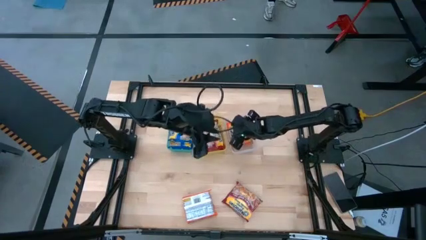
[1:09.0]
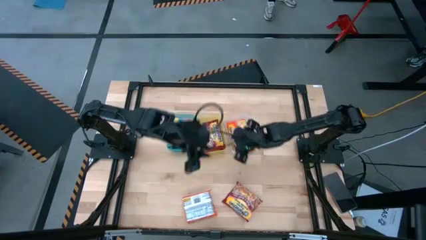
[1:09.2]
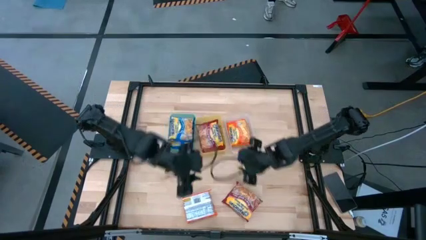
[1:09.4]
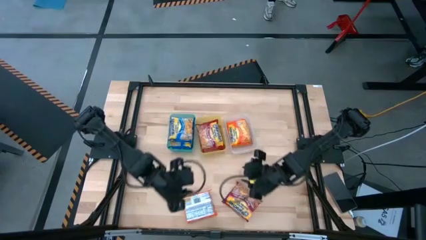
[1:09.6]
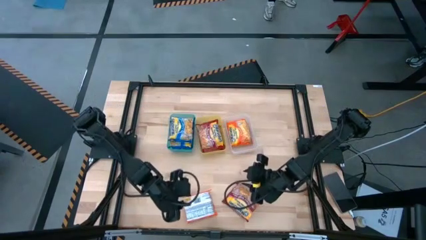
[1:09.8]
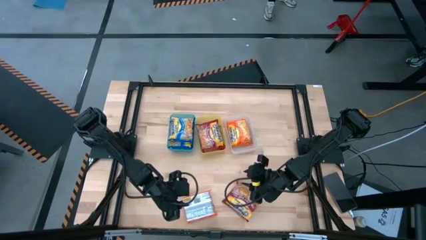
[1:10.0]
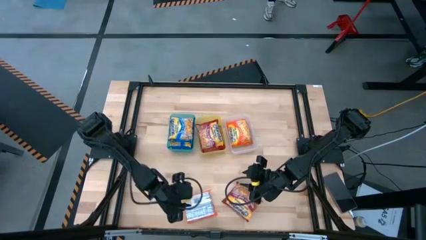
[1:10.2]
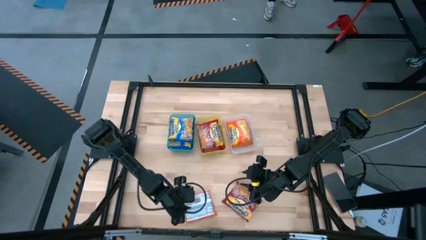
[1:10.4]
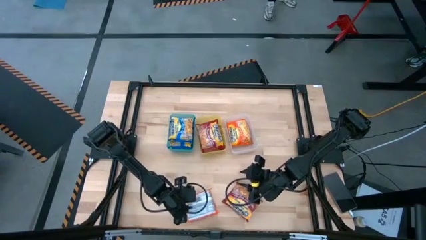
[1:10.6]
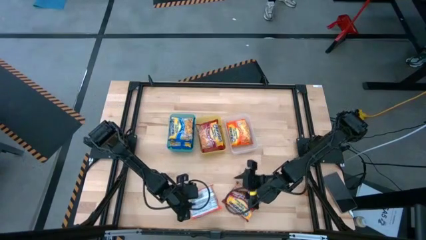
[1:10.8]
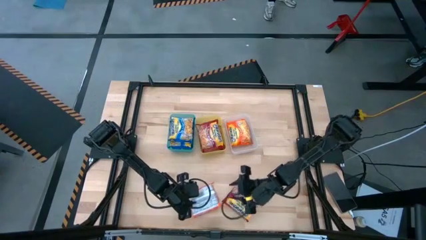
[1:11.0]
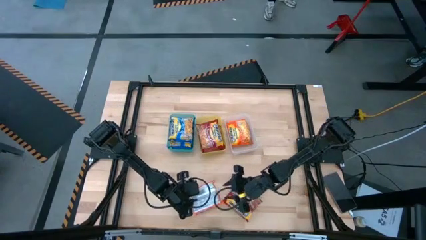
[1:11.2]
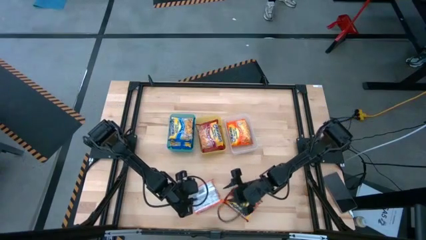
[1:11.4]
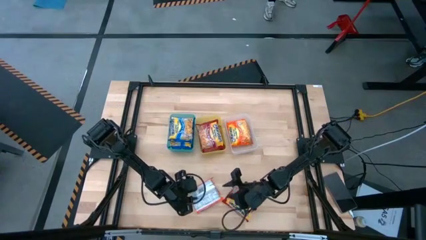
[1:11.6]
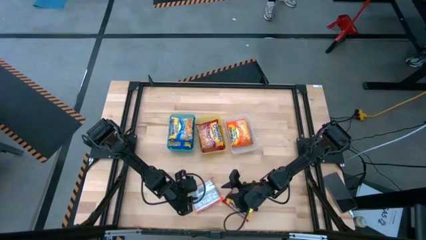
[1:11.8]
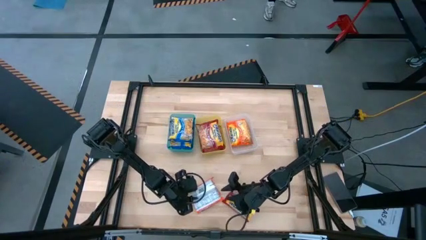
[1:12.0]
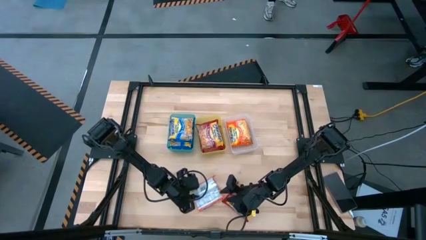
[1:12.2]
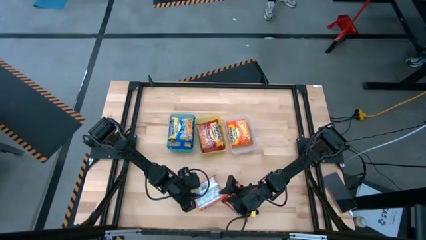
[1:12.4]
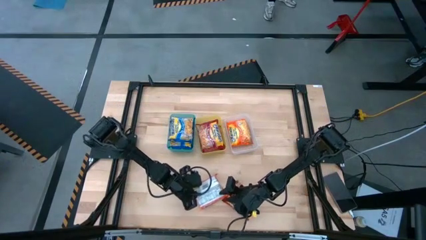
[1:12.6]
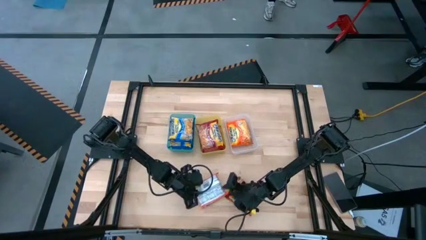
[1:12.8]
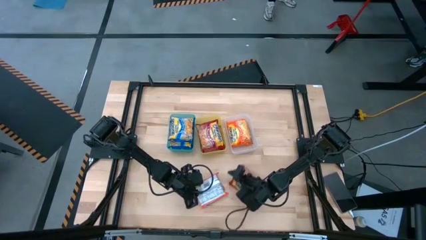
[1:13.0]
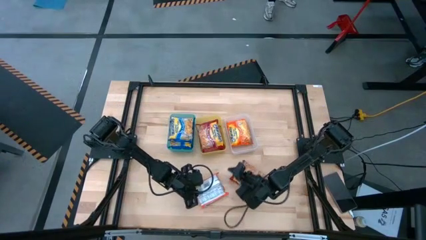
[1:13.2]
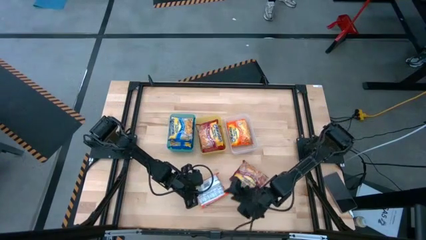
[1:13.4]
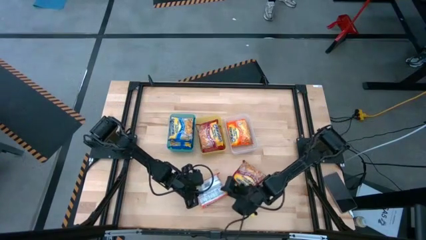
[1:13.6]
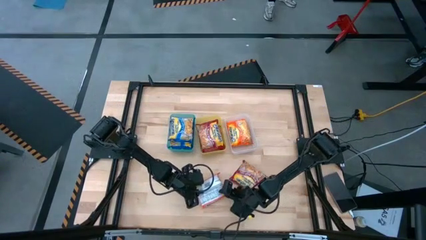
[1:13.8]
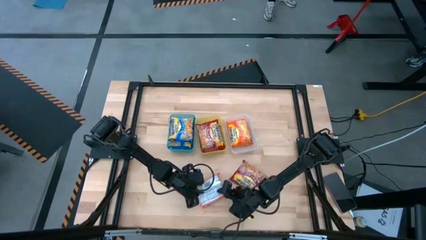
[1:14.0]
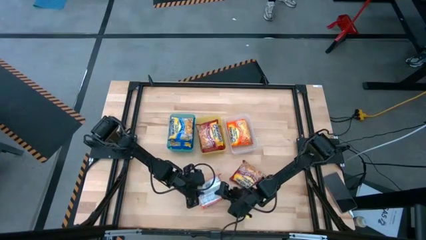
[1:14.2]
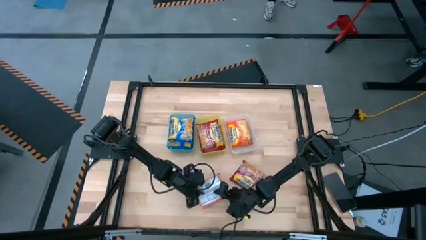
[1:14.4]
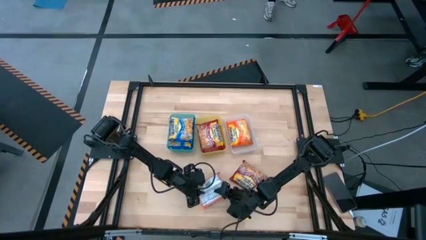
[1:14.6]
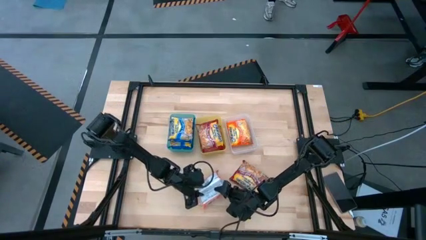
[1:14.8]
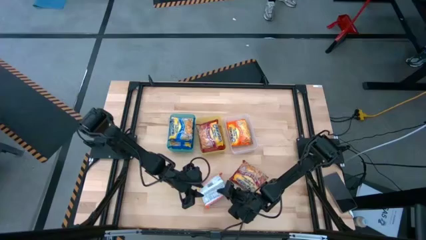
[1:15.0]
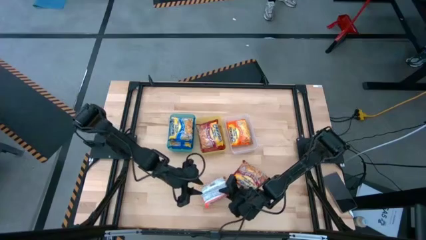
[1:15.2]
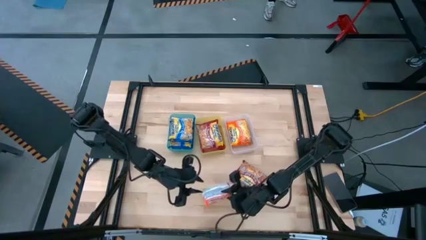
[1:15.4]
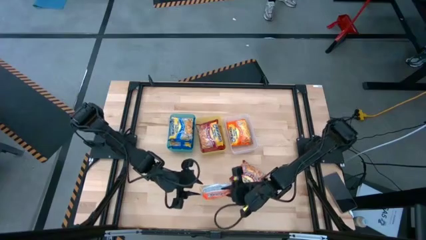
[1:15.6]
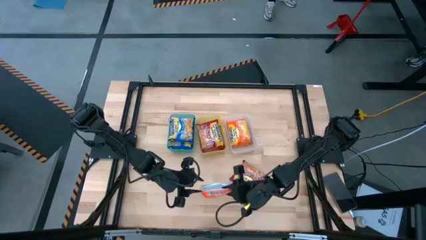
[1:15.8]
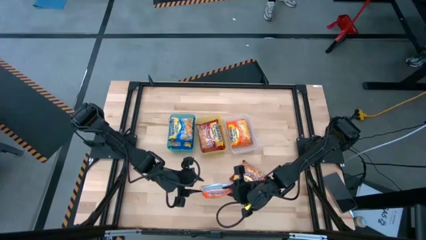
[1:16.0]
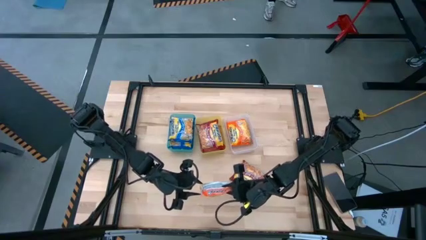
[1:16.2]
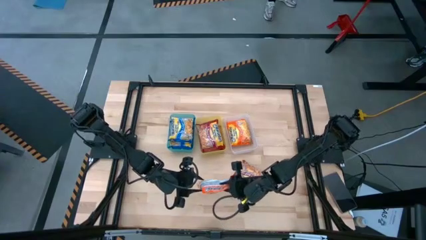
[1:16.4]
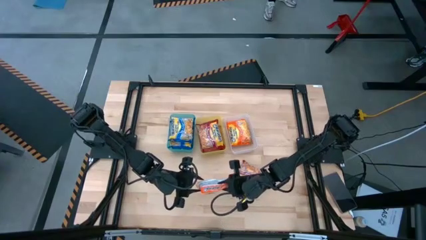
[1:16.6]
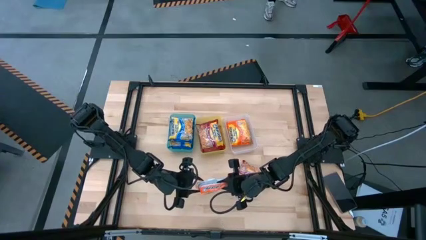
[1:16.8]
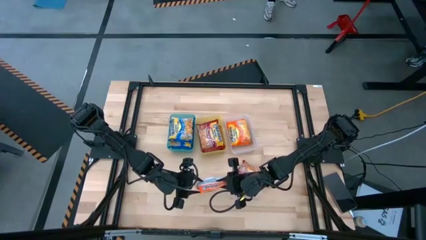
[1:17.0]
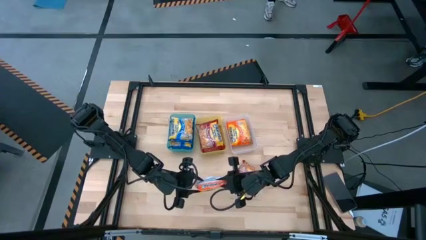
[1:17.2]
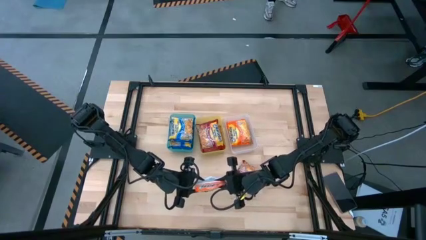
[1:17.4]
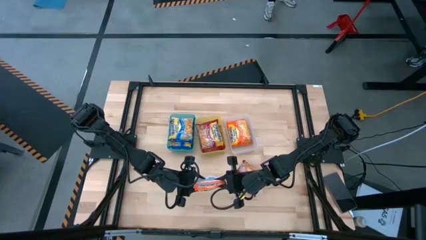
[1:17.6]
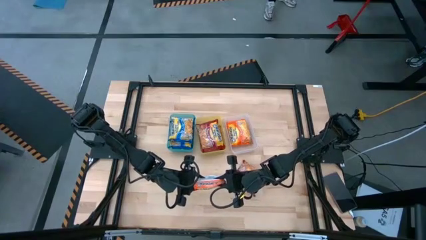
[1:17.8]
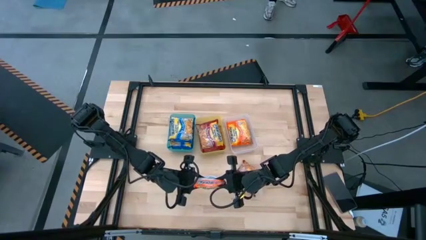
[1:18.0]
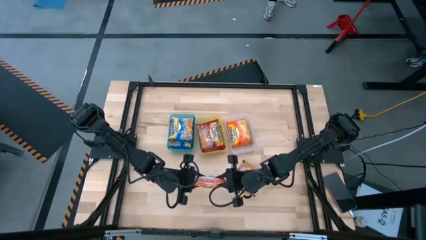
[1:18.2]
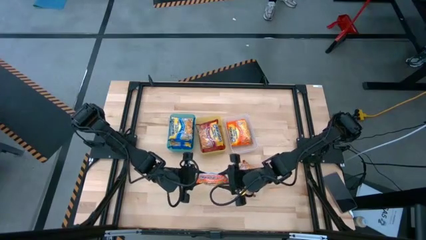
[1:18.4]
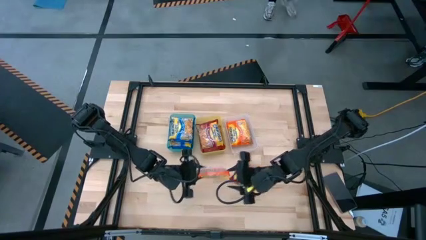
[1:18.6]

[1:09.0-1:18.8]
Task: Sort Maruchan noodles
Put the orange bag into the white bin

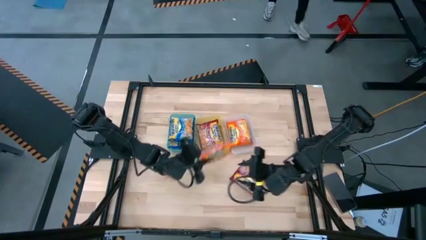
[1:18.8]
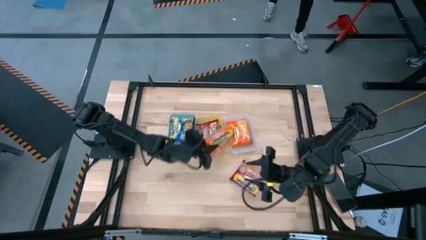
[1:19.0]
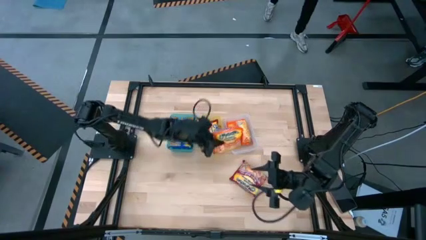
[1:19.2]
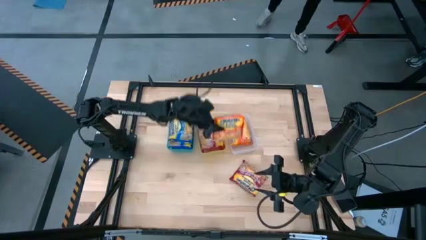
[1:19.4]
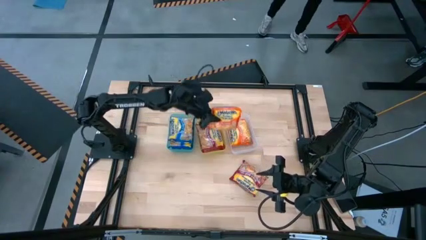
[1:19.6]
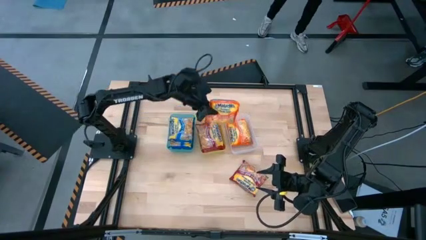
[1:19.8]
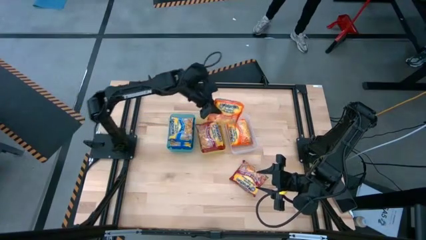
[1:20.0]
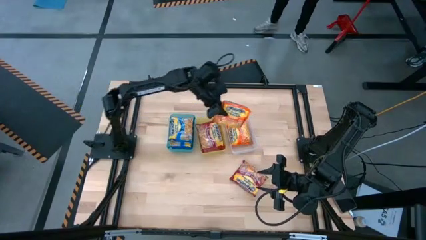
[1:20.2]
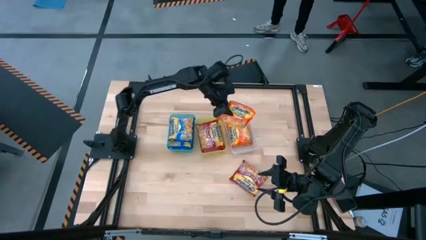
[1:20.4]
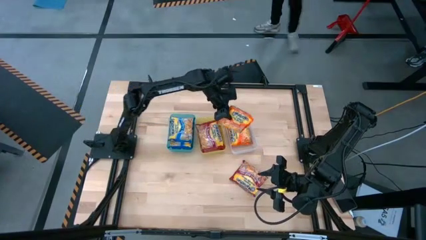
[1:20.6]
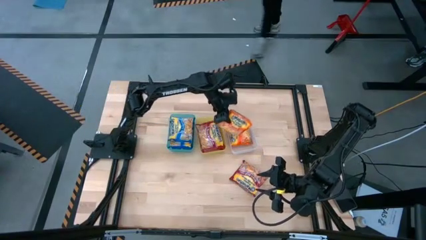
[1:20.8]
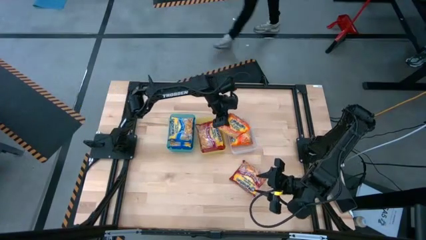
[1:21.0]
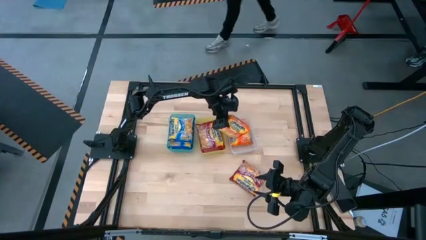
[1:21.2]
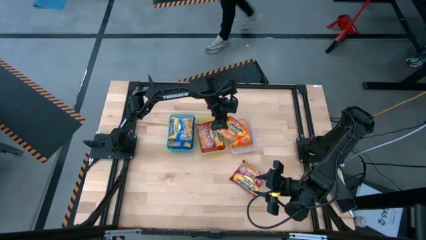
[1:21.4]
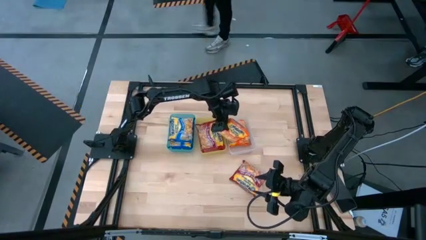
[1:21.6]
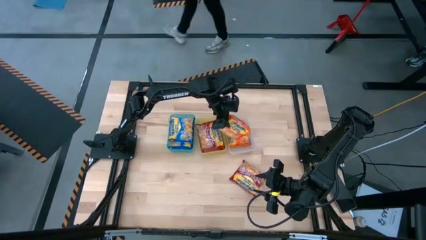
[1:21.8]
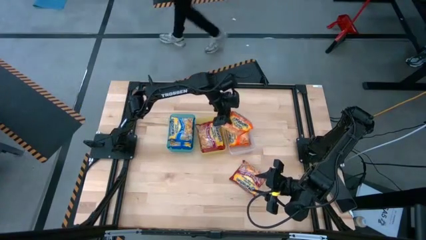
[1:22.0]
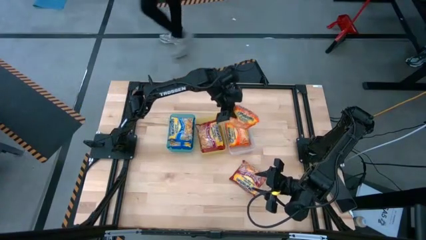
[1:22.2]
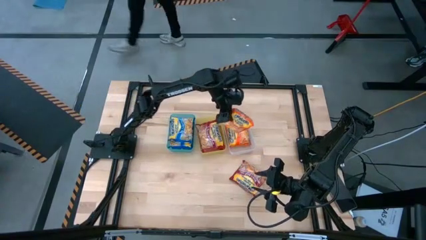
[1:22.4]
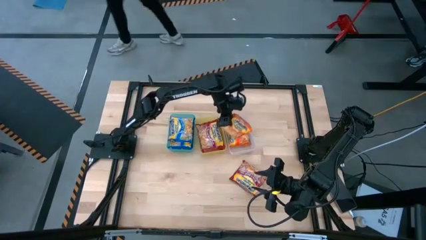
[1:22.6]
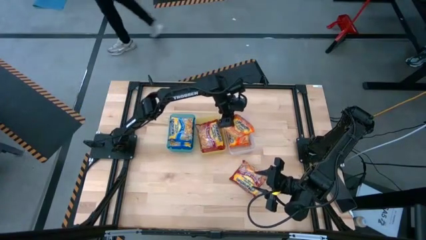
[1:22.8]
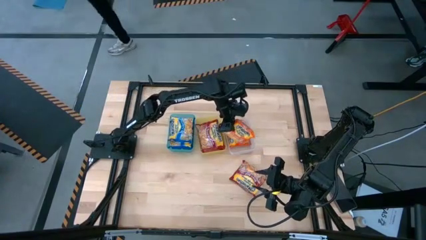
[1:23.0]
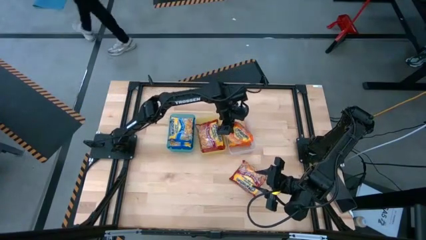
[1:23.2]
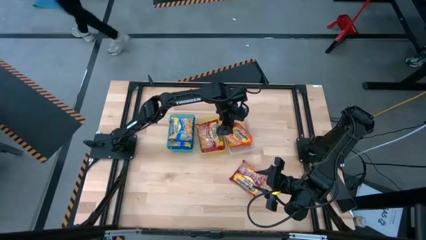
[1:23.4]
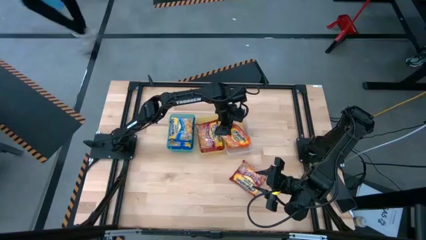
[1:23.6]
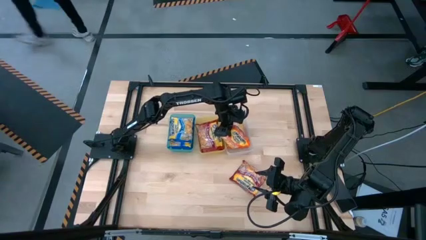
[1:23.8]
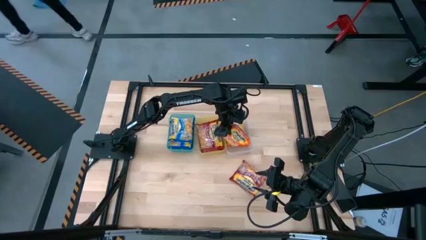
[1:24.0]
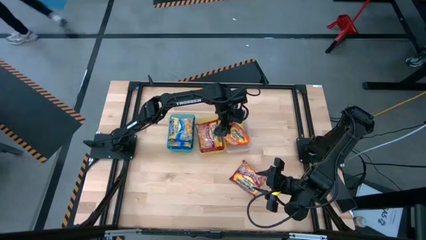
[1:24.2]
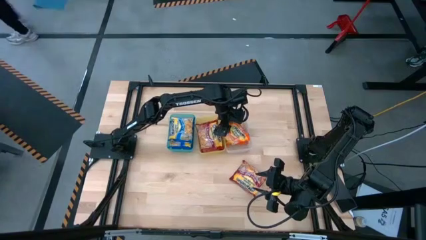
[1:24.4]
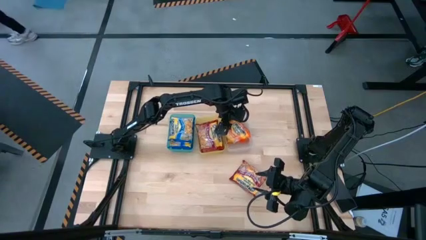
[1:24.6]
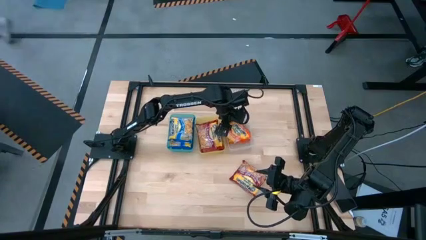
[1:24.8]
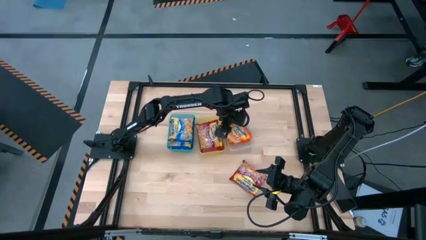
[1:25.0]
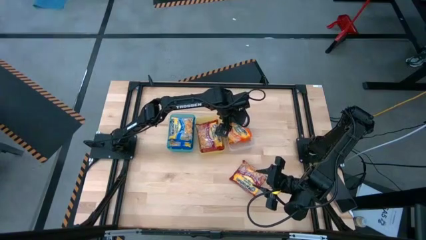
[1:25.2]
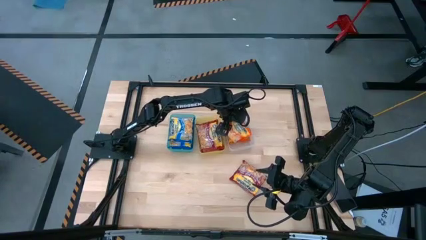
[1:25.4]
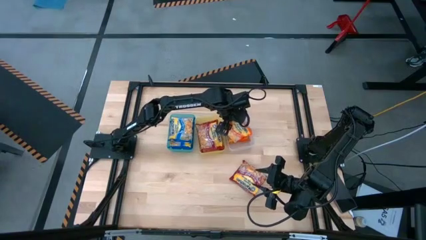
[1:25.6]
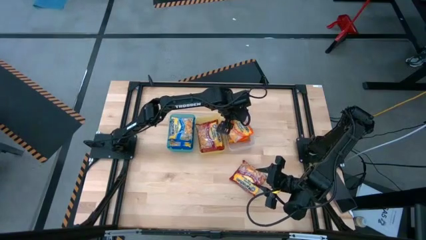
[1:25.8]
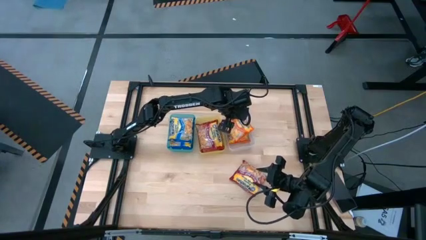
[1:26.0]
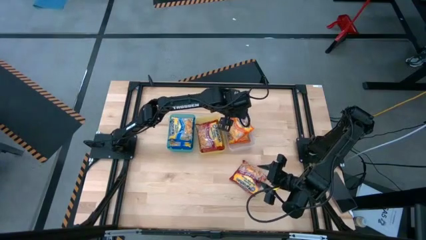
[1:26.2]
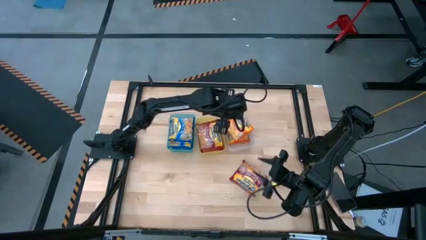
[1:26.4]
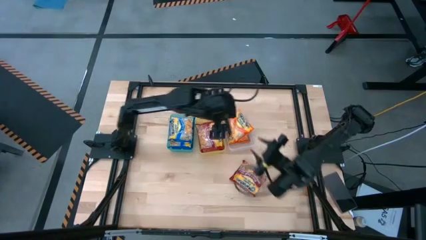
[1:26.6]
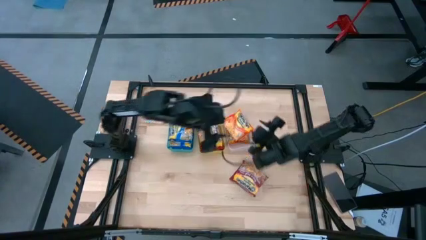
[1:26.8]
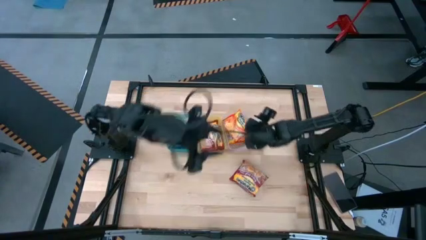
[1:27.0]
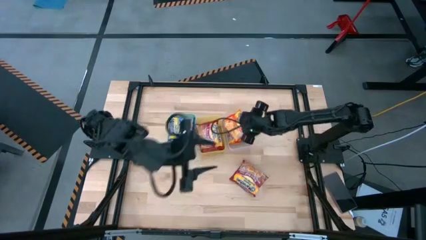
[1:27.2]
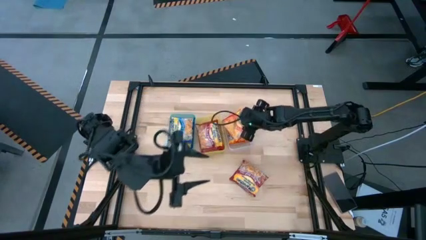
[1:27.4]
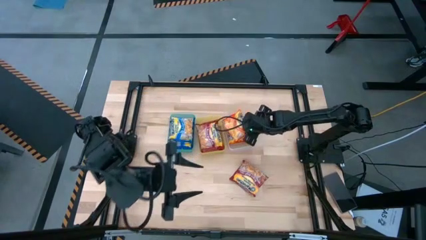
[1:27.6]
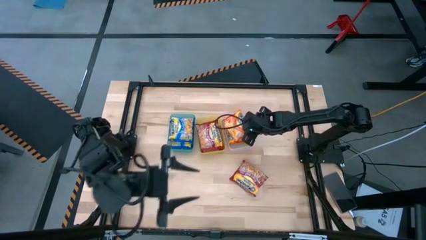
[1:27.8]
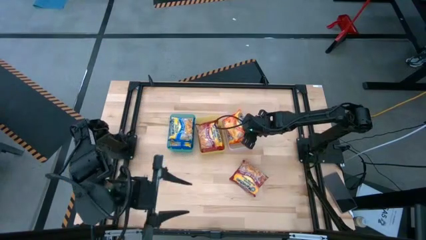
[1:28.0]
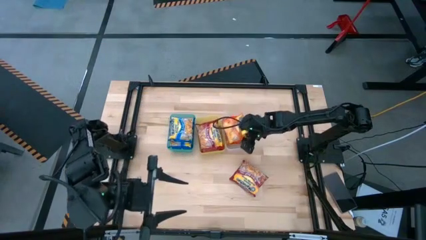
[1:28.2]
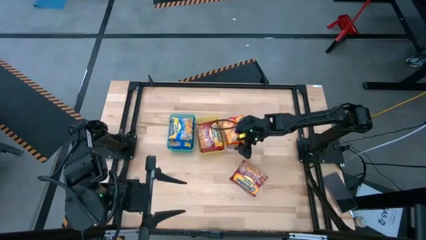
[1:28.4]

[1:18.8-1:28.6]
Put the orange bag into the white bin
